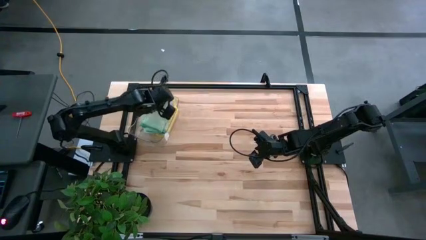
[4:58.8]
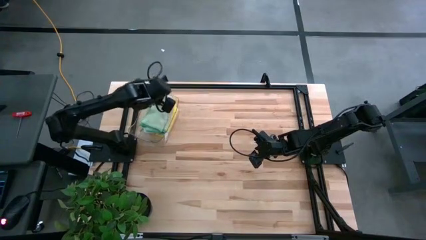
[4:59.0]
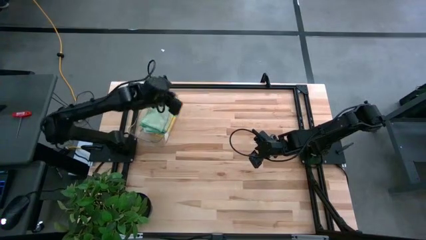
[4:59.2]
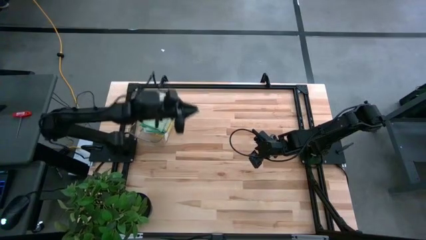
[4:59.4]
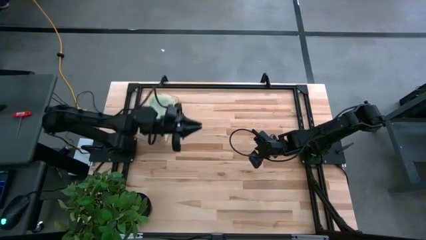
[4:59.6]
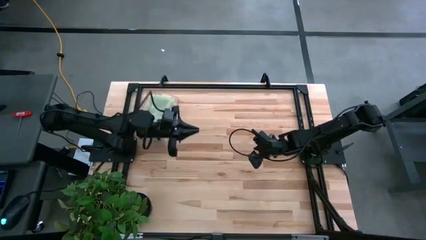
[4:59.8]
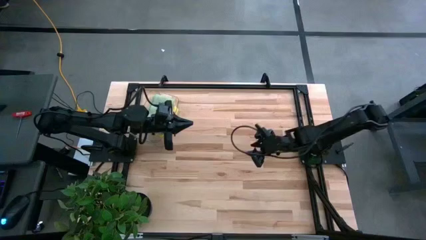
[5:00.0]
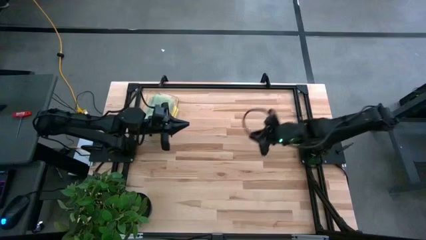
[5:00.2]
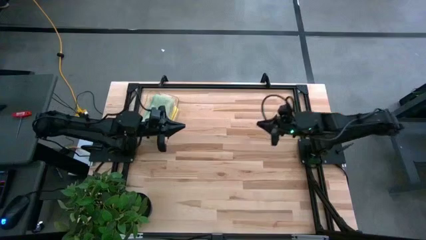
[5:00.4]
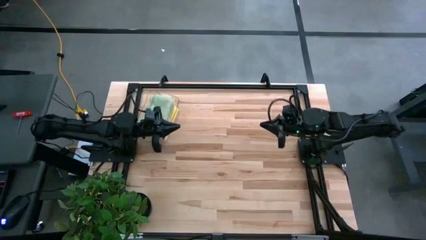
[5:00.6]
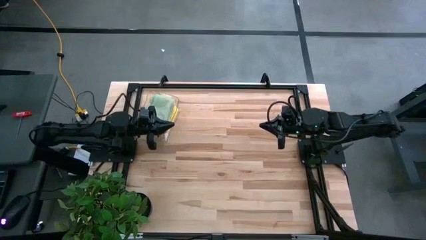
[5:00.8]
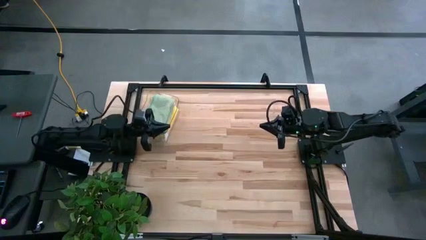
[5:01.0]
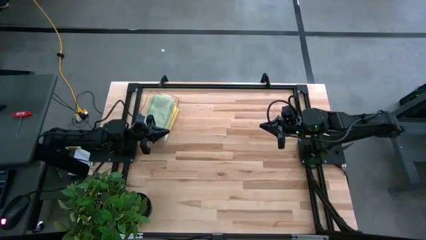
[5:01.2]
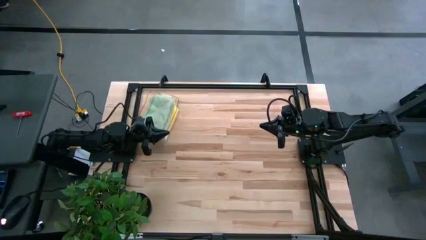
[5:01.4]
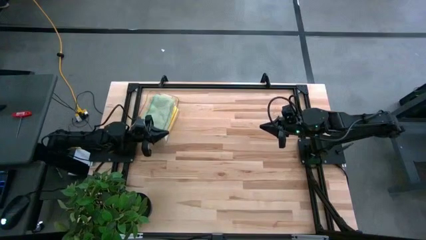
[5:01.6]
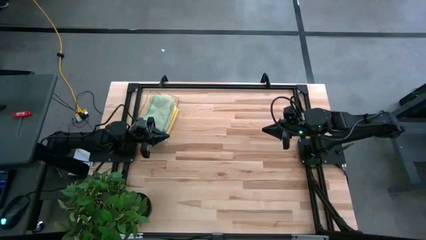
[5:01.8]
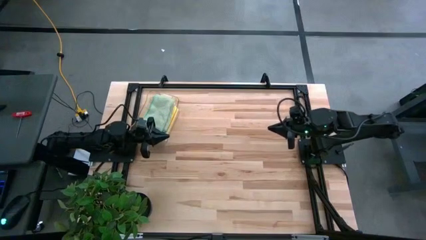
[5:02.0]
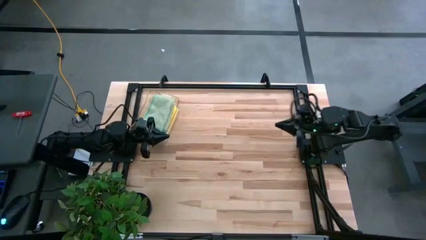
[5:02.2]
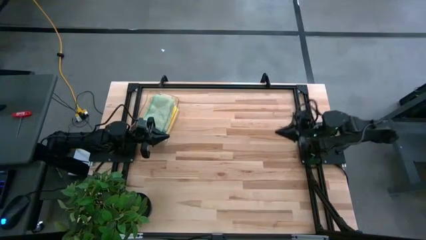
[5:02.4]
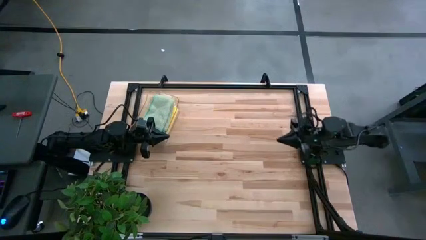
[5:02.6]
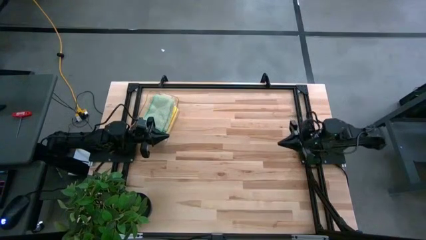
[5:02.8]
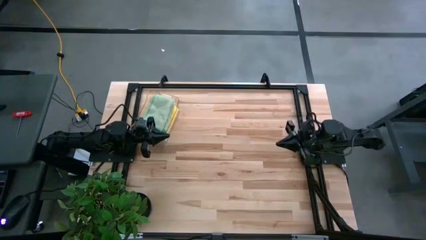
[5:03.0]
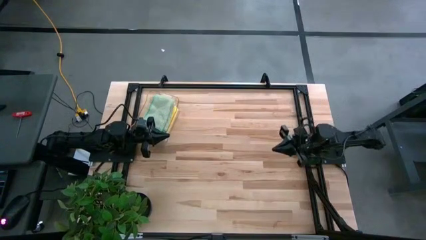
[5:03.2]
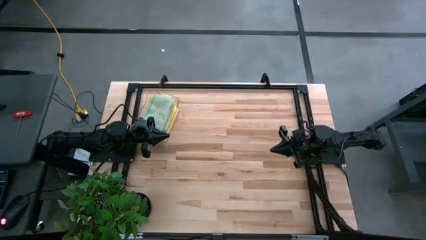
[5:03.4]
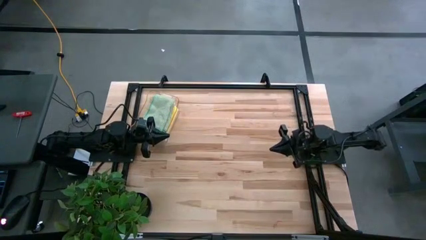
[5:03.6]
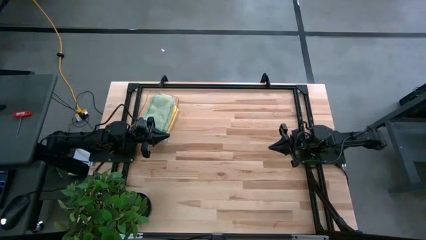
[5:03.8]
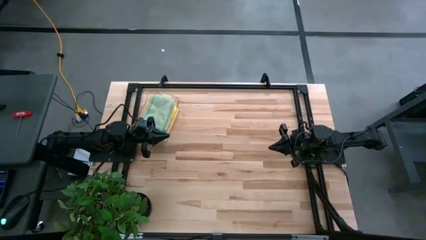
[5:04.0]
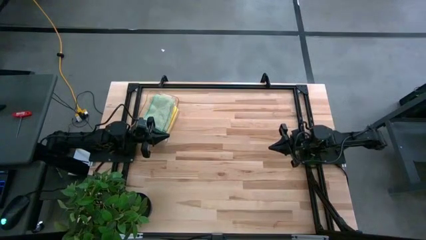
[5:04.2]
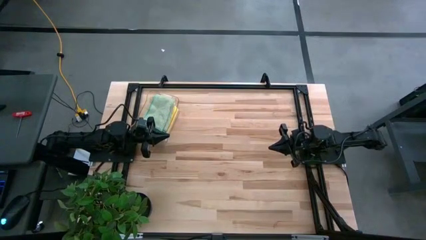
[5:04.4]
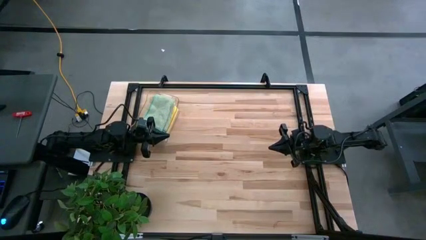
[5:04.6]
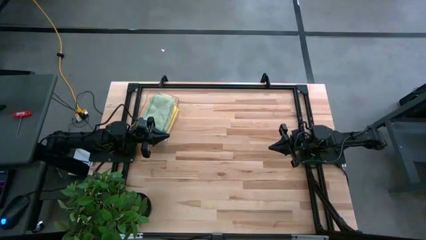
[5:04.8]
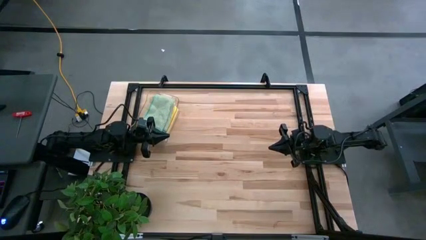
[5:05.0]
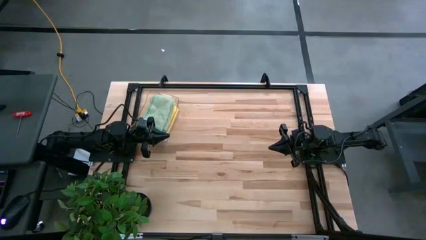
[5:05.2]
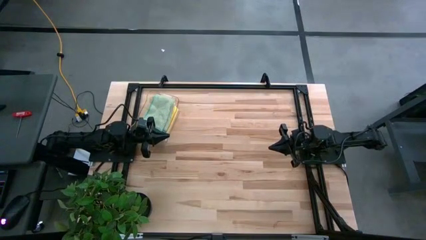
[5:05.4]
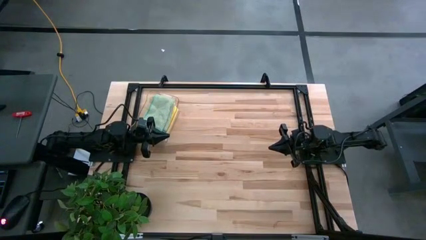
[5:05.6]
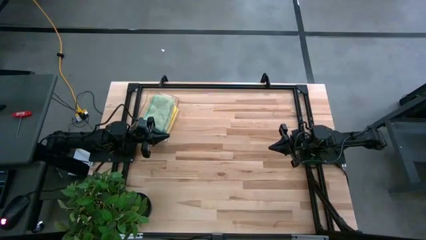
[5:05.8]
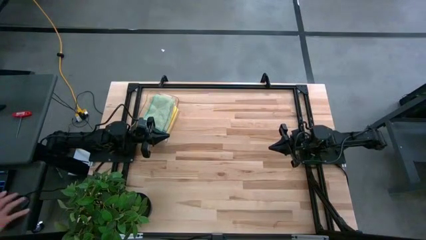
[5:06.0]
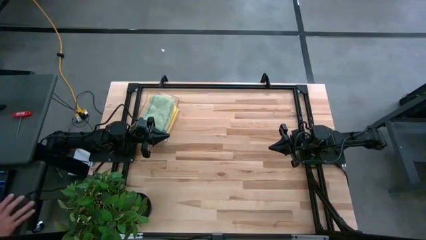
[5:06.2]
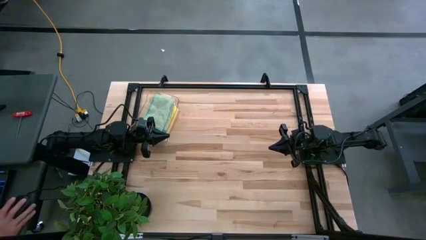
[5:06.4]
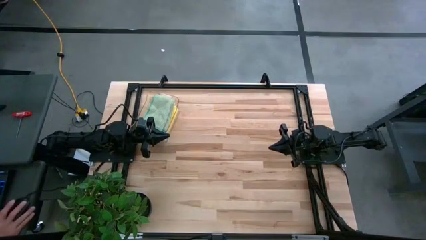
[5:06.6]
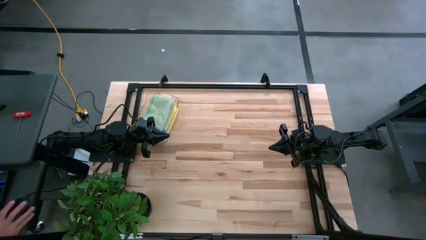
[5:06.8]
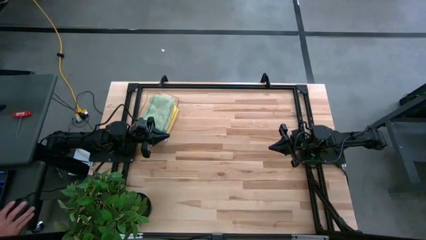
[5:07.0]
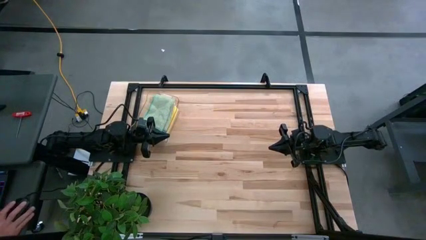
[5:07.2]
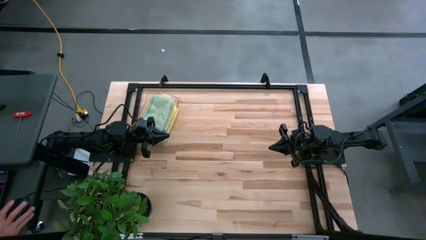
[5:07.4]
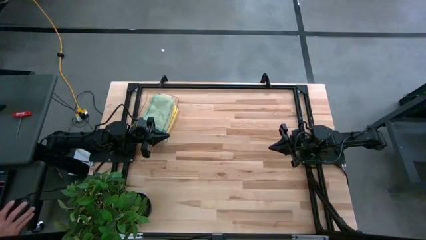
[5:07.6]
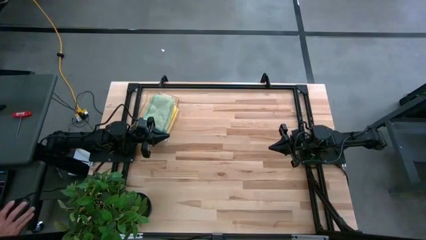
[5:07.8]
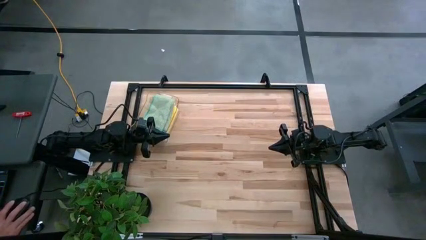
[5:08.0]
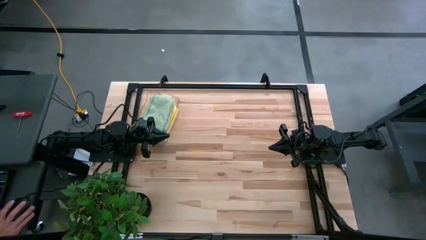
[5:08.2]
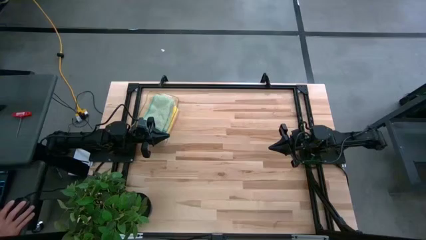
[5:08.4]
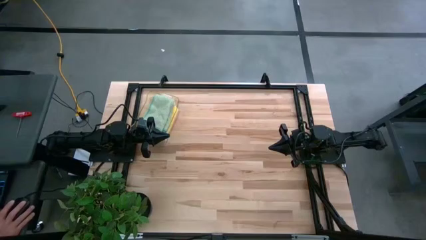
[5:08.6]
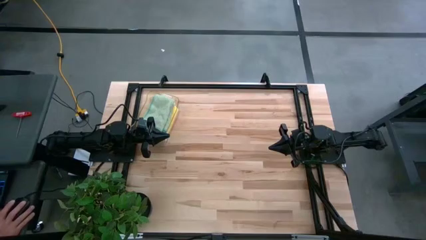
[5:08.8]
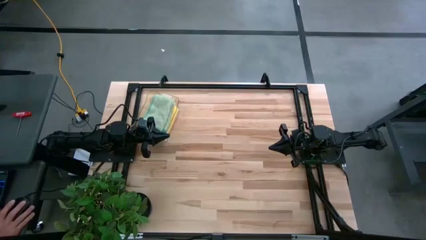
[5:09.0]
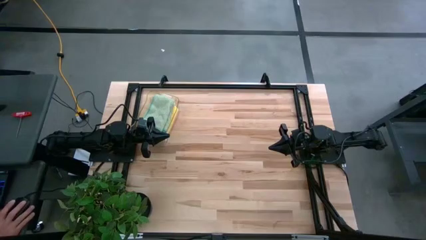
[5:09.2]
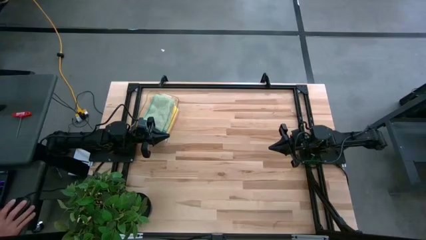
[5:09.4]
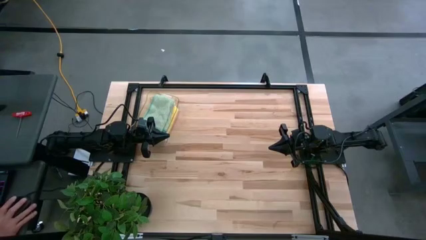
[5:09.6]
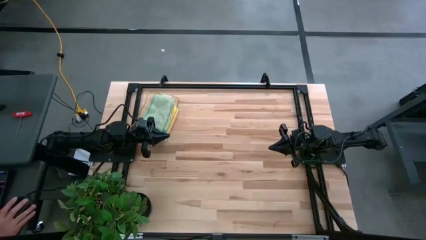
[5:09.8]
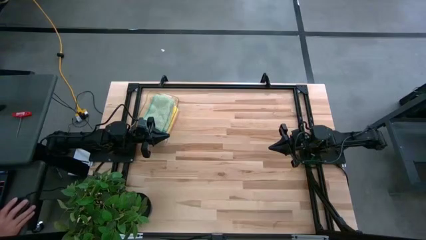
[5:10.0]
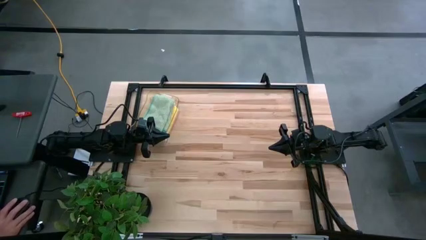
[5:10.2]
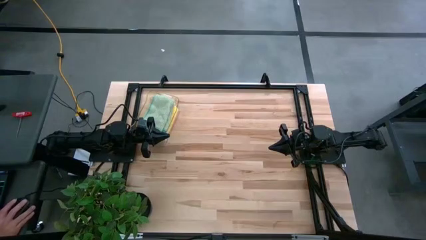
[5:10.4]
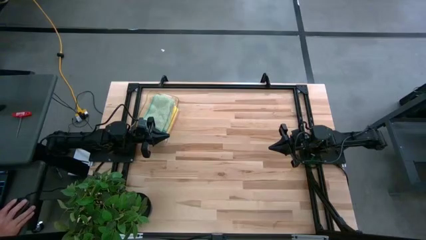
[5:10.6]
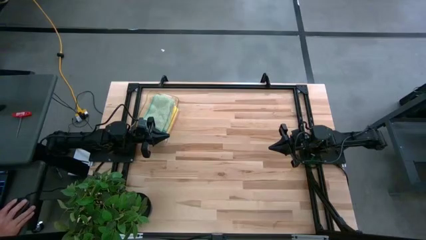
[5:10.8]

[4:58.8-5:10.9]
Task: Fold microfiber towels
Return to Home Position
